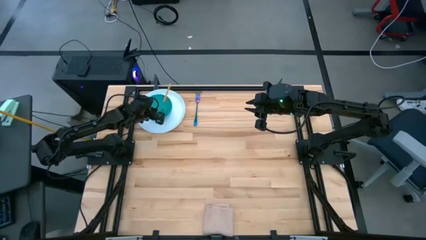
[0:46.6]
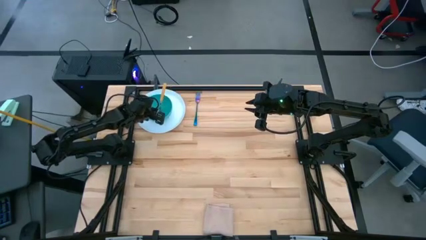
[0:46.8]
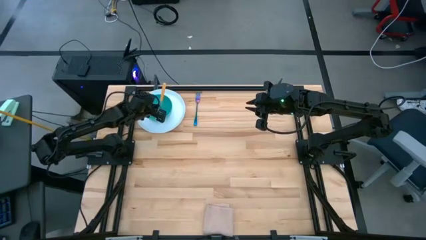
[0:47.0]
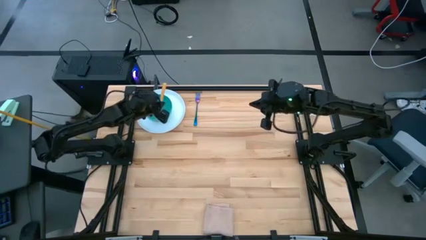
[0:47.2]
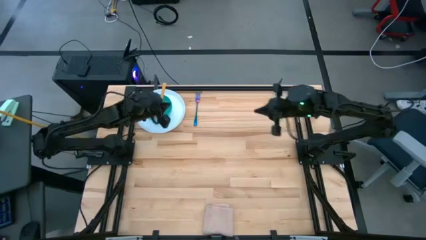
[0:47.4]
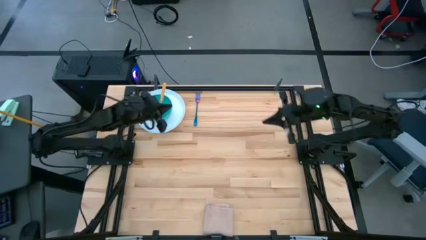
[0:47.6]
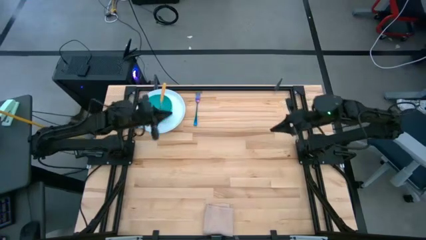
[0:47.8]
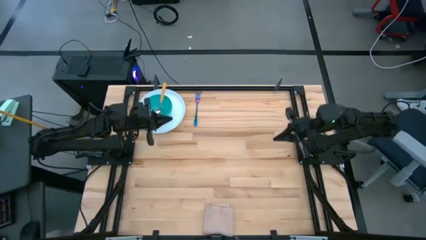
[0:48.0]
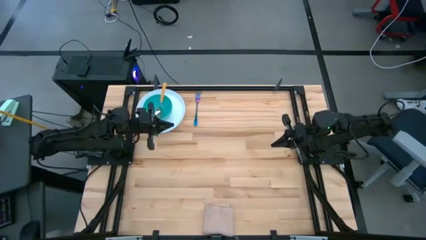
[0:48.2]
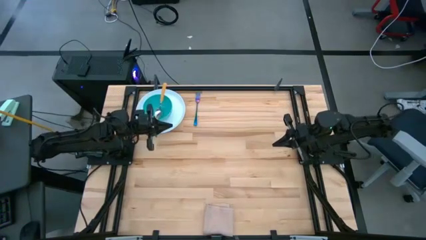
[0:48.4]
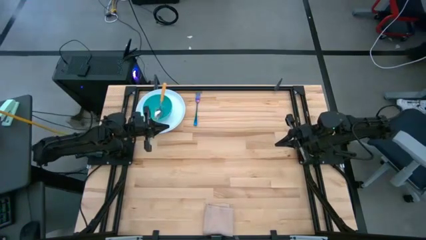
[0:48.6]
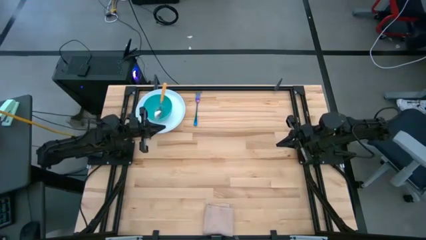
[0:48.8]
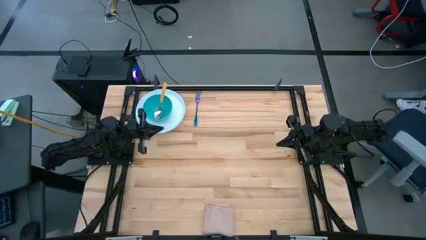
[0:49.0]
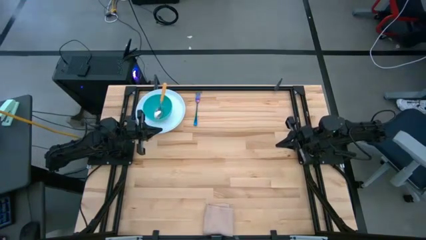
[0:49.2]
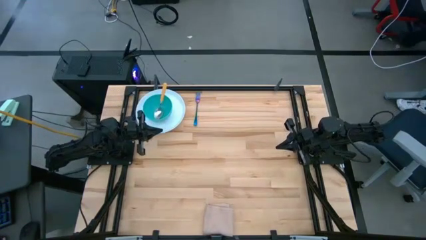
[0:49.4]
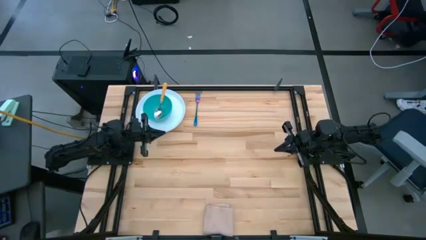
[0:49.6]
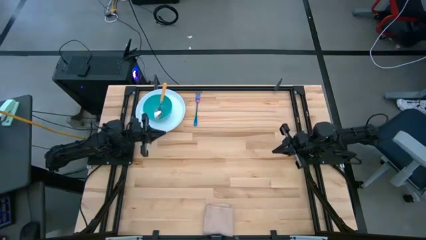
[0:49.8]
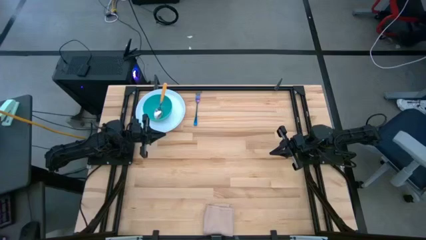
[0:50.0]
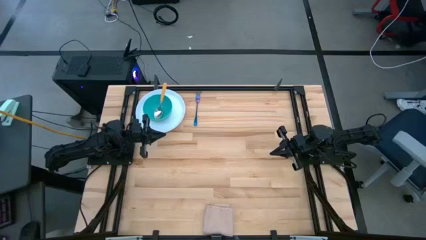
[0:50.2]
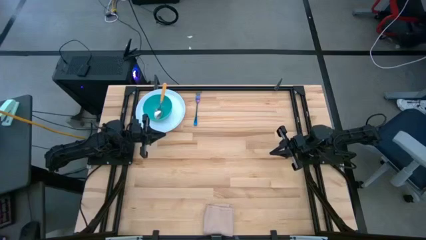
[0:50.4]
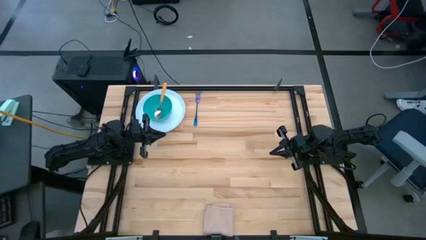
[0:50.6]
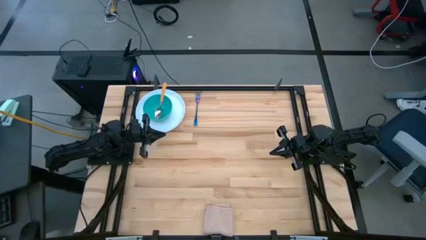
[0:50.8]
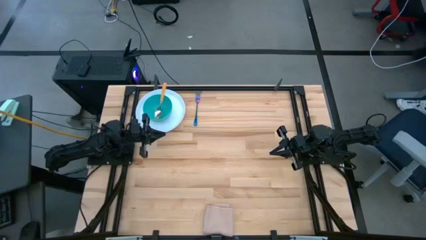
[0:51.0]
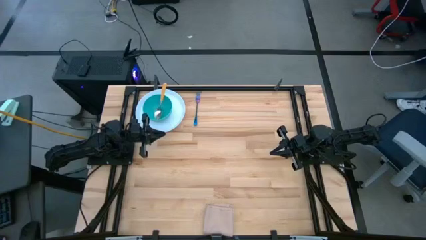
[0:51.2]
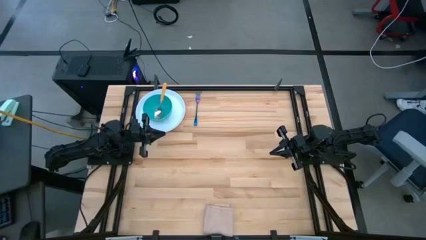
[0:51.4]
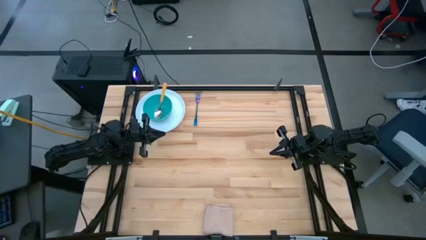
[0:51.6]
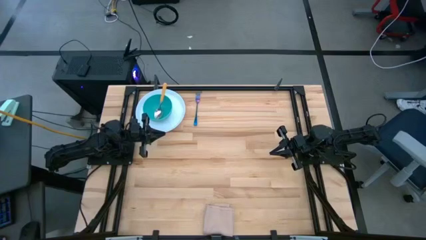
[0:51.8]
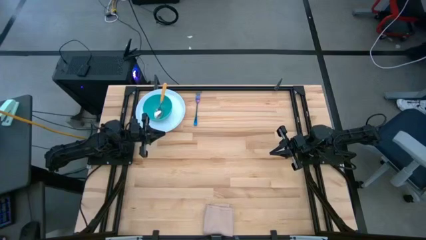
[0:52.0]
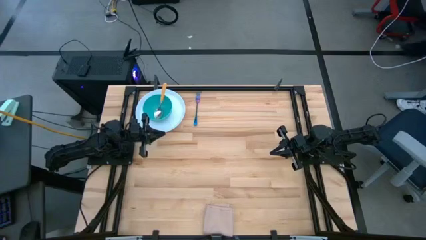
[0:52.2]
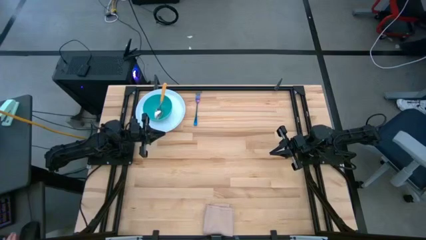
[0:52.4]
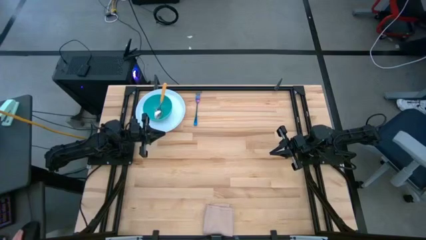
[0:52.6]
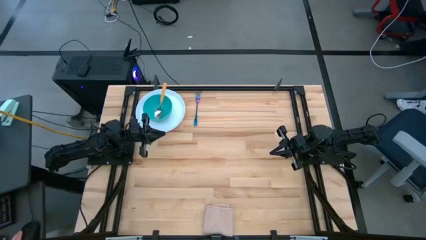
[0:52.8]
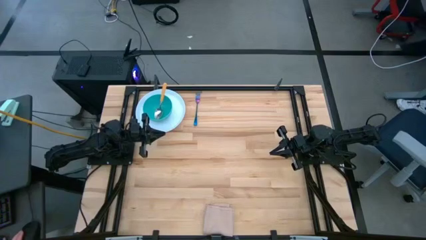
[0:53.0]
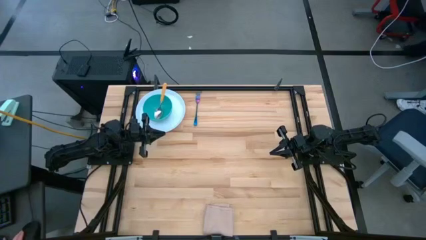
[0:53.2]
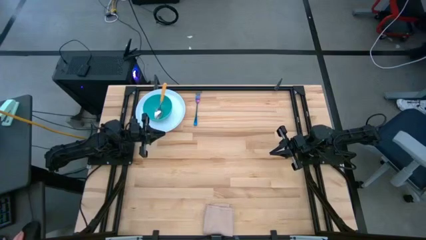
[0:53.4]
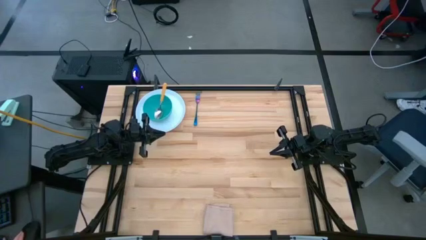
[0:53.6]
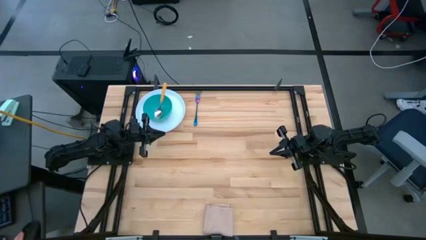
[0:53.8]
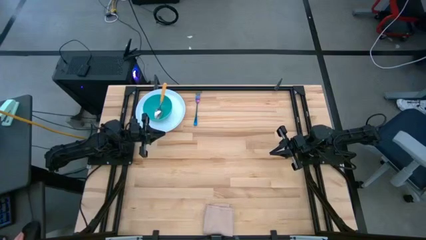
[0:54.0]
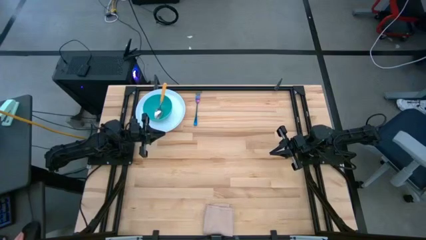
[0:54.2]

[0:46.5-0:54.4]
Task: Set table place
Return to Home Position

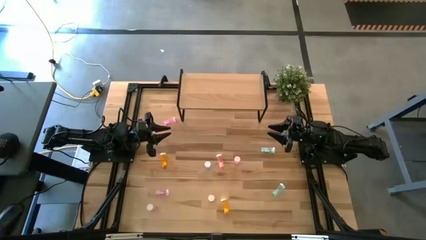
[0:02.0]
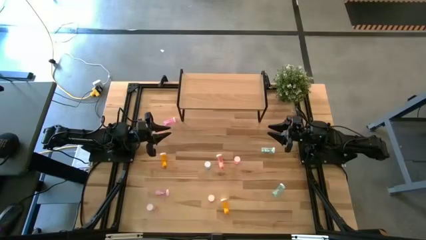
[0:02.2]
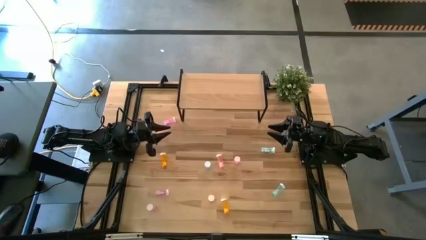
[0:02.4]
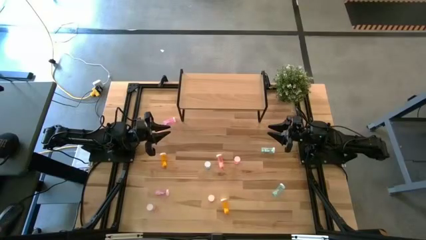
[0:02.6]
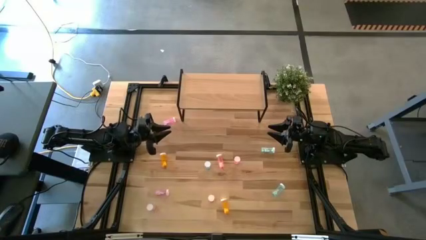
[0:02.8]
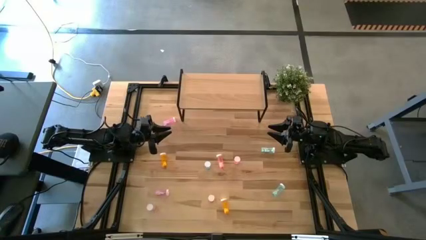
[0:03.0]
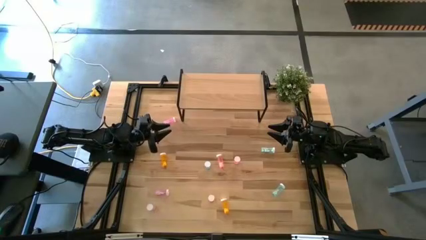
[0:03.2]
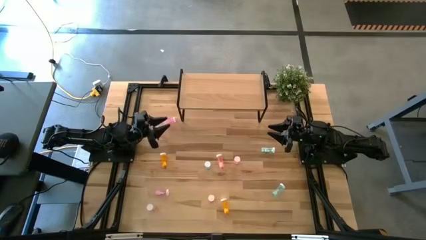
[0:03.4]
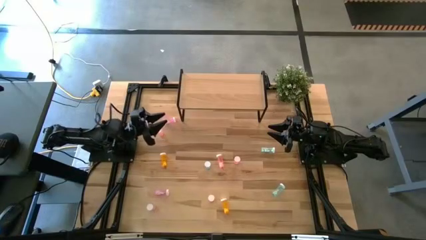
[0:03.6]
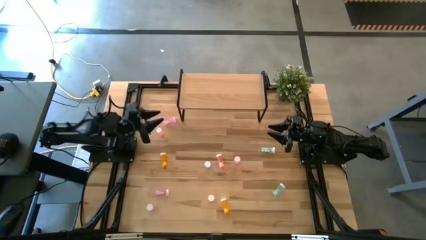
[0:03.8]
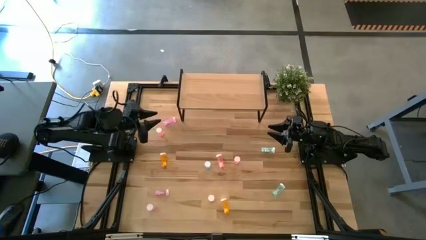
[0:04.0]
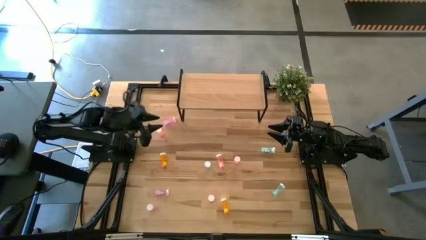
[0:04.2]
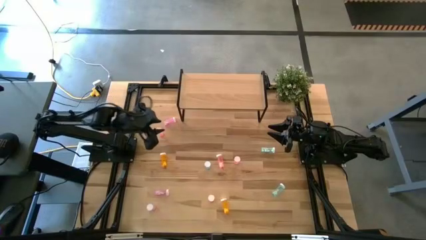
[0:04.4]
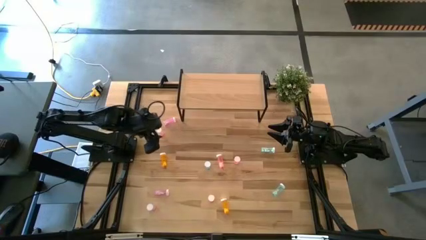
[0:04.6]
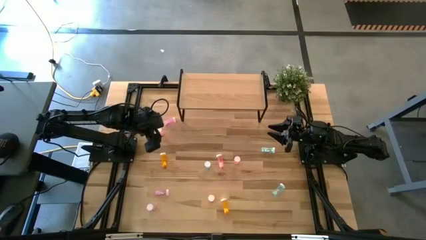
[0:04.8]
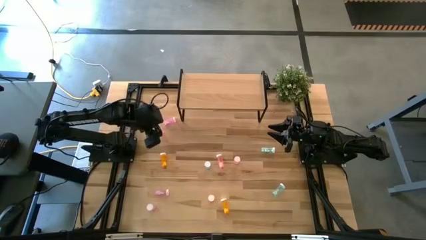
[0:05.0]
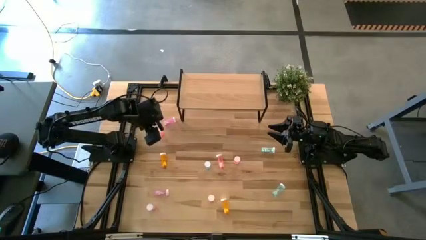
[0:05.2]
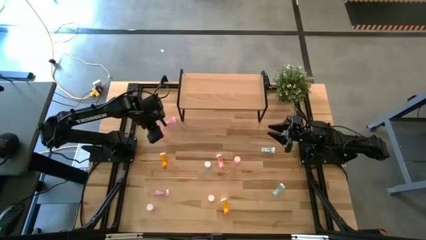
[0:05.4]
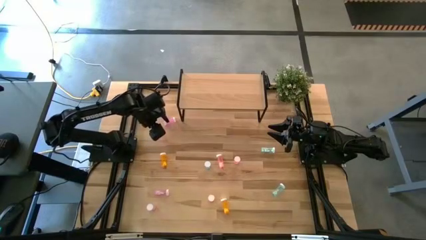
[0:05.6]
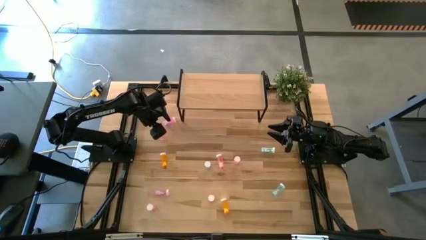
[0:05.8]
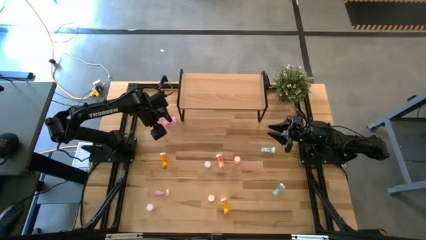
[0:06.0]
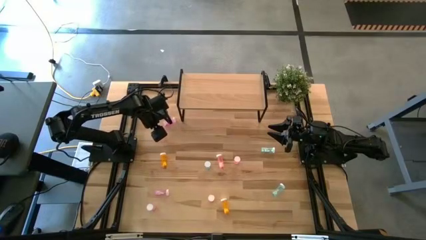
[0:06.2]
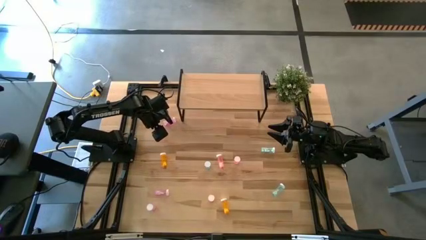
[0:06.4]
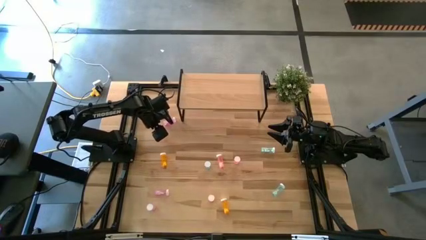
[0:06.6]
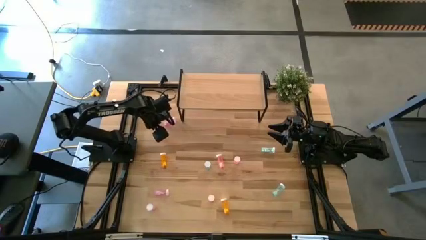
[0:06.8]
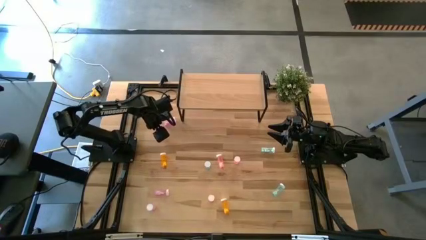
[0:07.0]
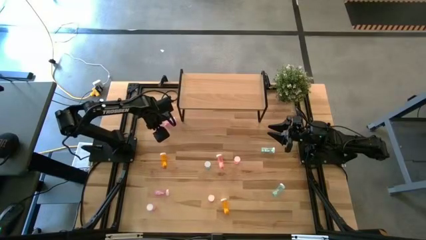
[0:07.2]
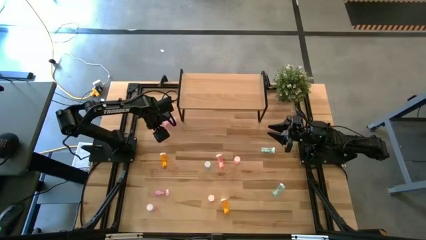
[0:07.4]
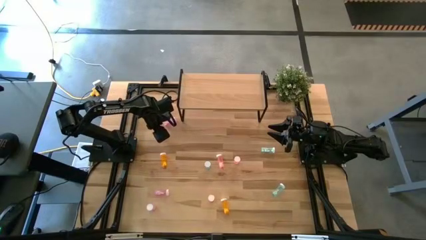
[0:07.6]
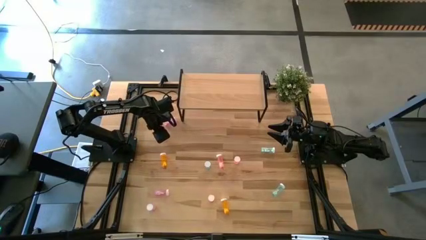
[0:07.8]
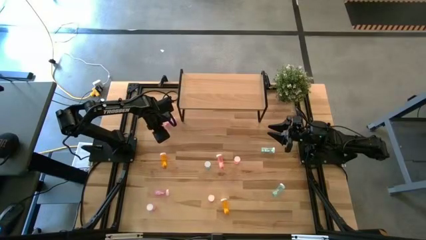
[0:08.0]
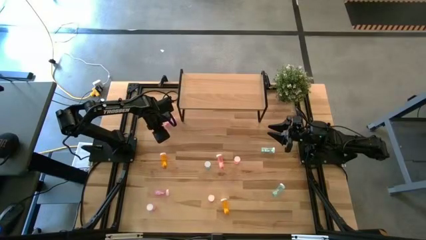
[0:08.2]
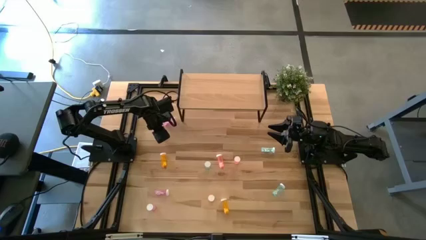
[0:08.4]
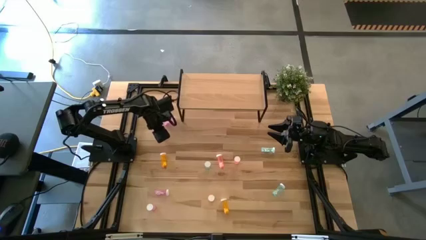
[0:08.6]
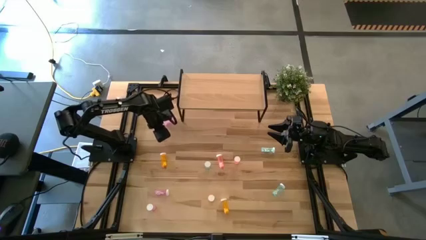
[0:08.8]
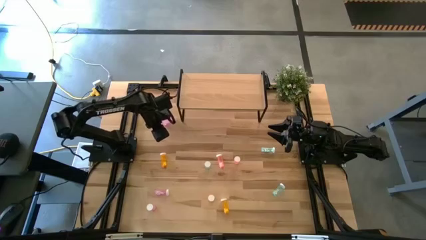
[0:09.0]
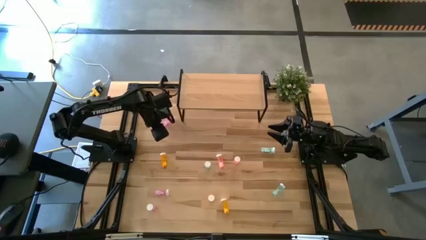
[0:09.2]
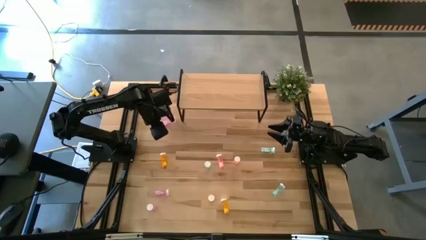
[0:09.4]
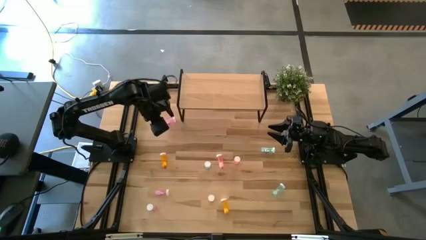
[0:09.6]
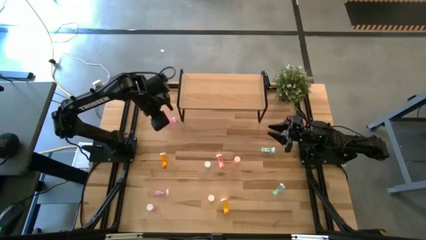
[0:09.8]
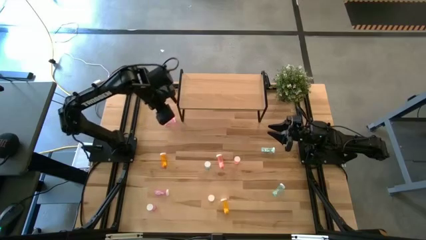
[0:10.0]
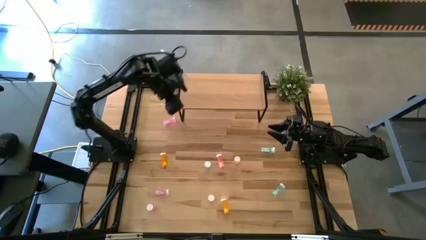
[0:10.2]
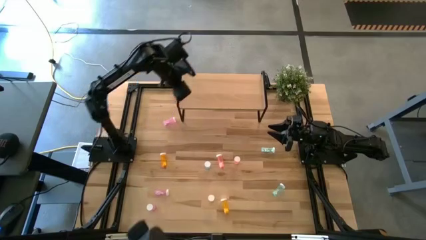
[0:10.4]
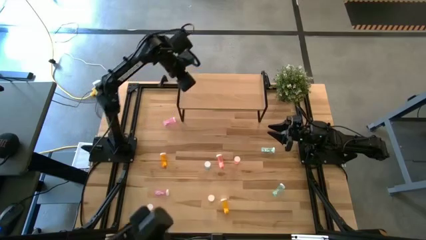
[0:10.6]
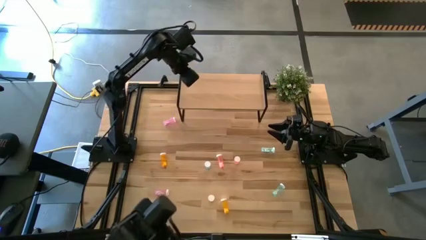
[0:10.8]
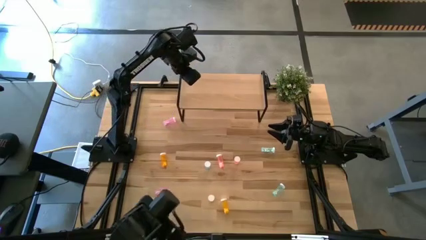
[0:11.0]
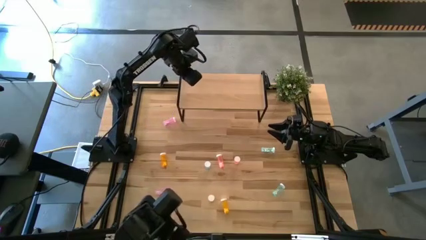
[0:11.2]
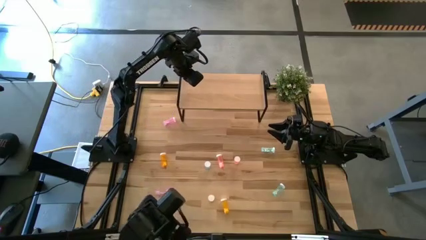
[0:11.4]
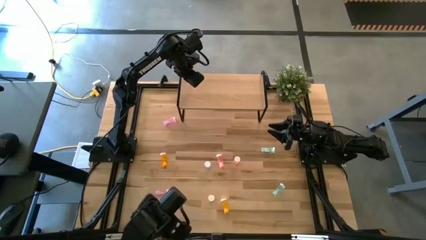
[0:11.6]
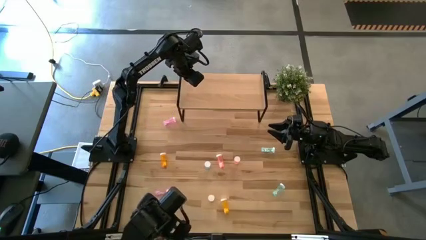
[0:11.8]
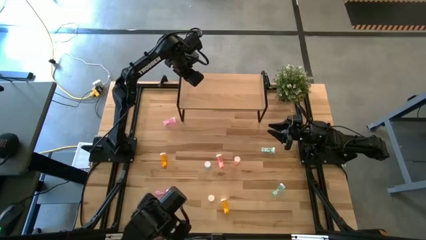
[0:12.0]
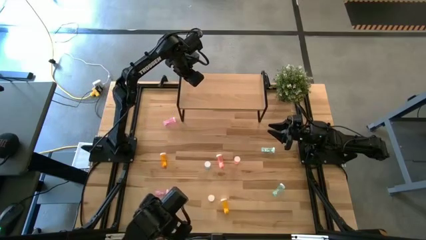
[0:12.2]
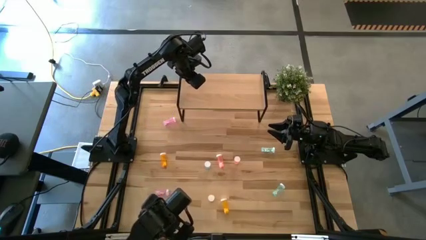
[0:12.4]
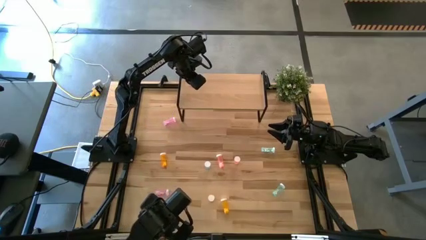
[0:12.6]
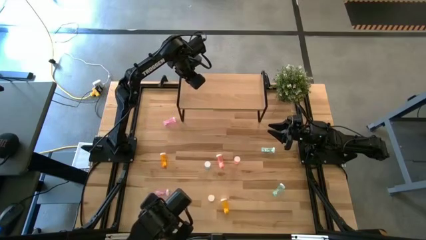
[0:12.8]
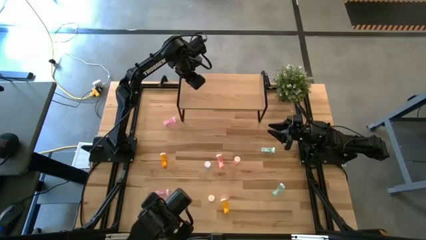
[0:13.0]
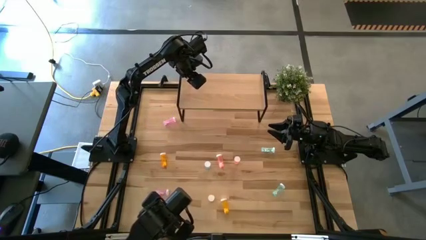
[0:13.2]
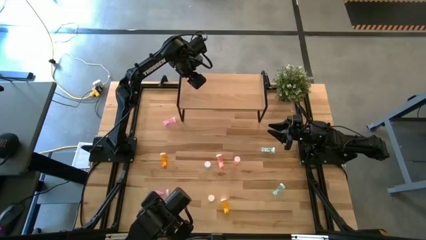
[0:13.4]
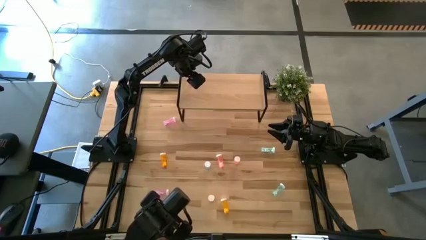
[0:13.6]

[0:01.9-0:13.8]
Task: Pick and place medicine bottles onto shelf by color
Put the top red pill bottle on the shelf
